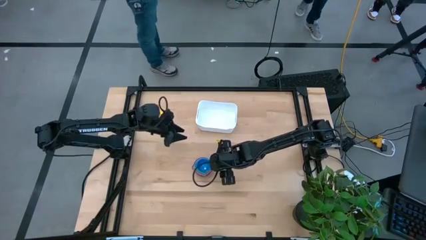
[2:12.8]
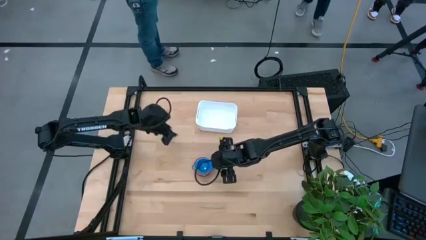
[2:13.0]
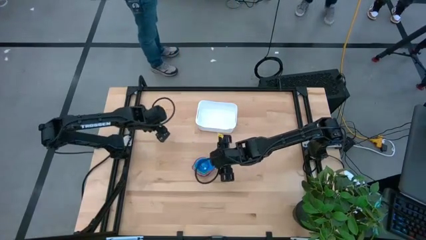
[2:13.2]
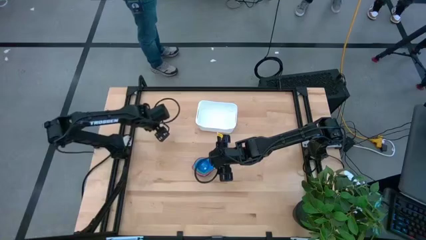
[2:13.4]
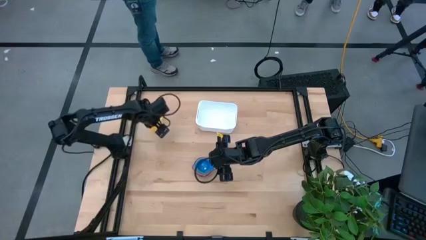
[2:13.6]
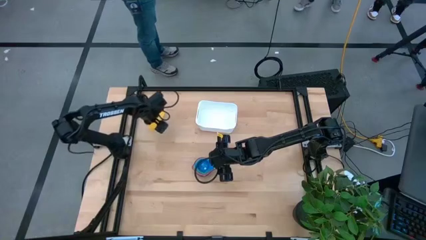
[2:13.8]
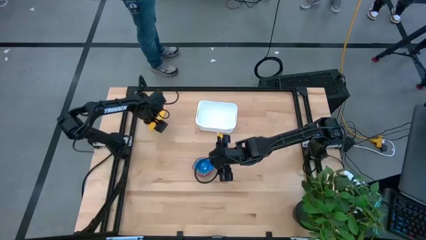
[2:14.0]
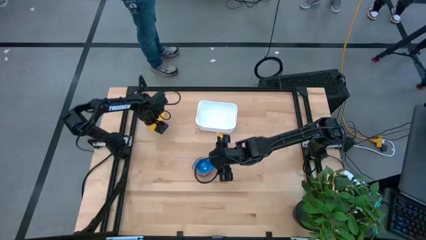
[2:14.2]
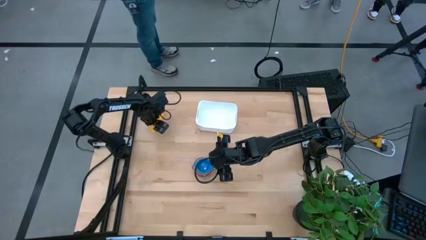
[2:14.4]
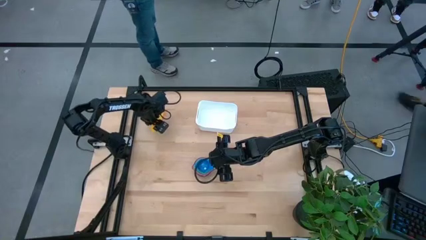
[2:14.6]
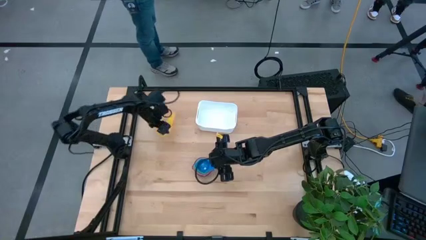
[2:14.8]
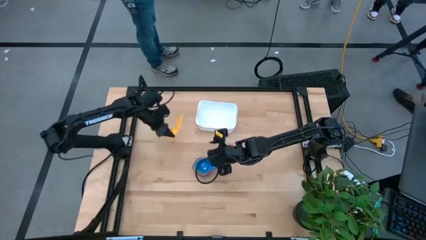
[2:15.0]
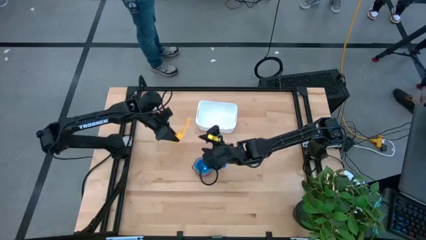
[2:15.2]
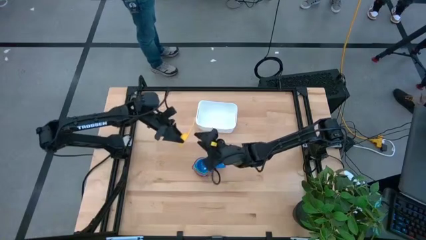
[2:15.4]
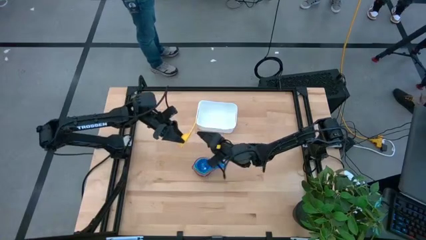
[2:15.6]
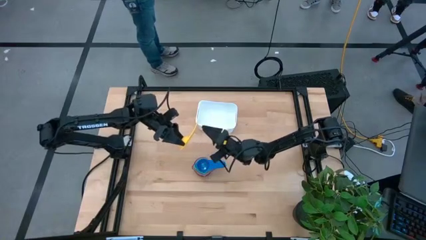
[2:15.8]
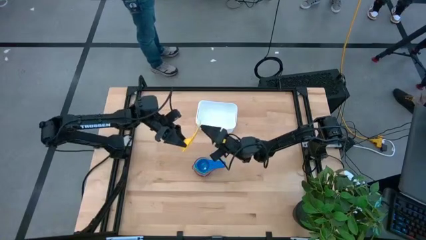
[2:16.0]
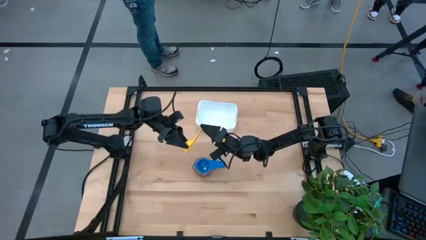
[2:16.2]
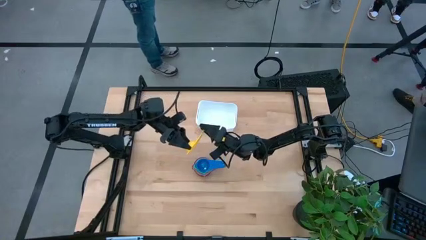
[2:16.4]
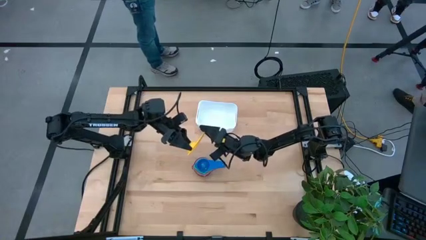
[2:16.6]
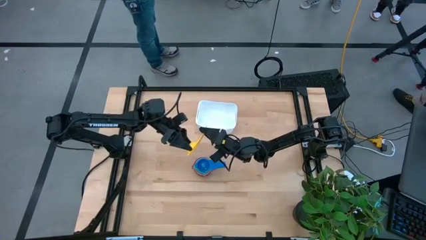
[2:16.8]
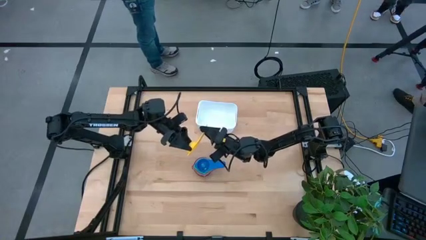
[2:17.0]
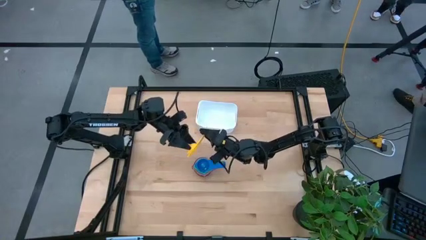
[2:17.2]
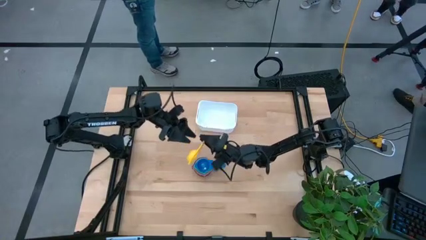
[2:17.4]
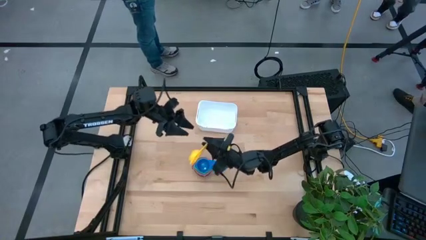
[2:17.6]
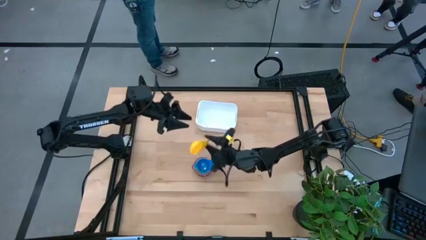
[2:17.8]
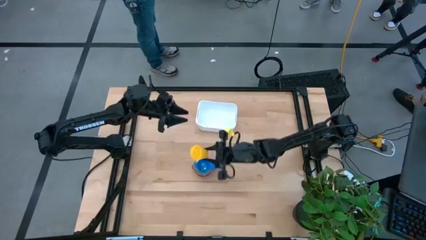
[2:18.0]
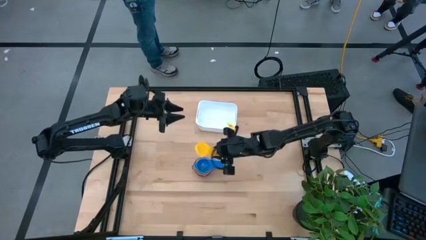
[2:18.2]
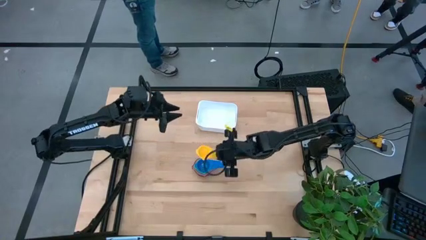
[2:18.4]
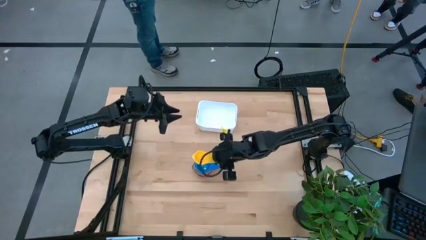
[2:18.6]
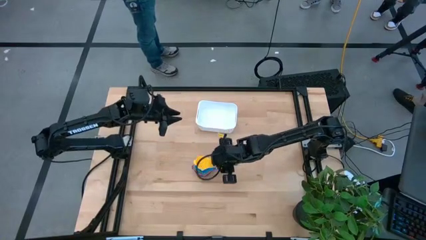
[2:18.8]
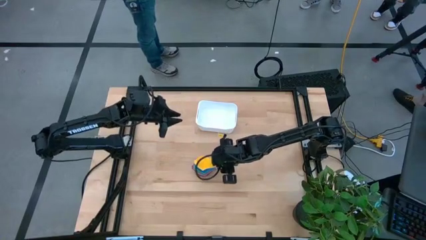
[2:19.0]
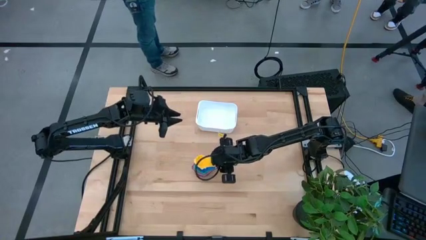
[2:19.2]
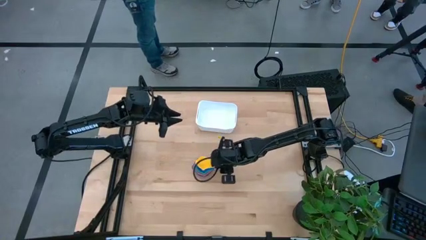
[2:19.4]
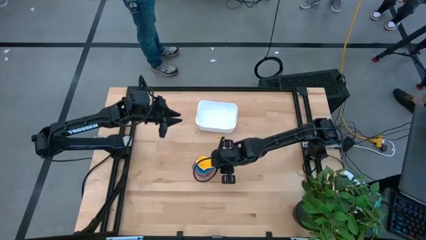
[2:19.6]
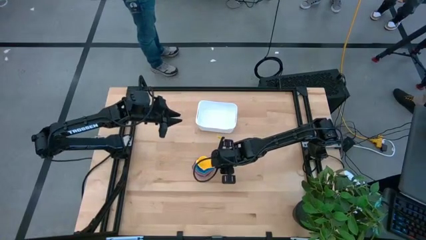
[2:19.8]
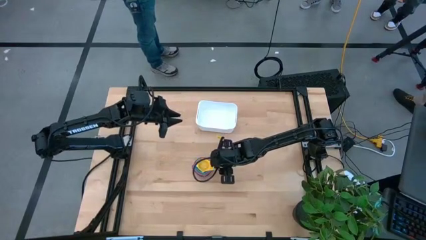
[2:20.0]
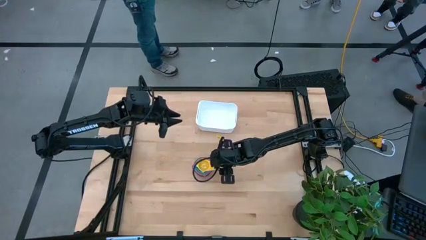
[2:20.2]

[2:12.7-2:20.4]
Task: Nest measuring cups in basket
Stack the yellow measuring cup on top of the dark blue measuring cup

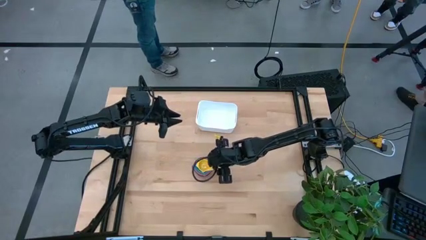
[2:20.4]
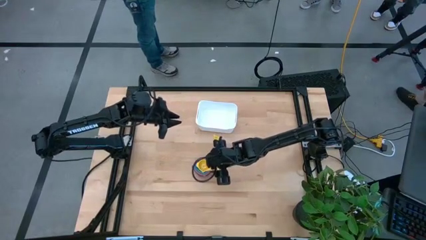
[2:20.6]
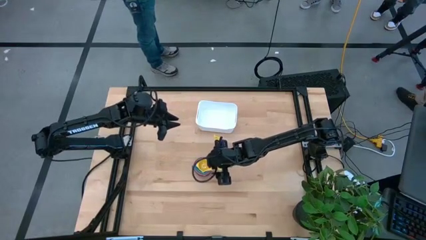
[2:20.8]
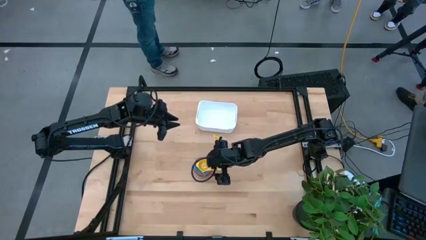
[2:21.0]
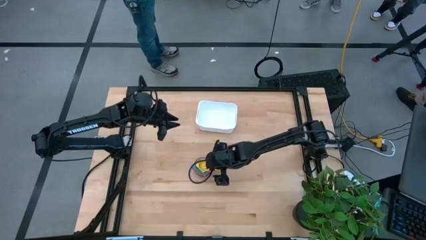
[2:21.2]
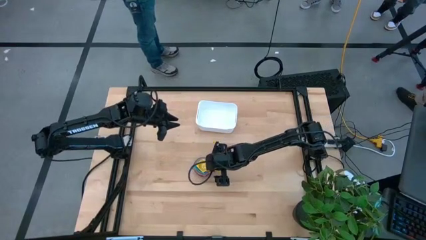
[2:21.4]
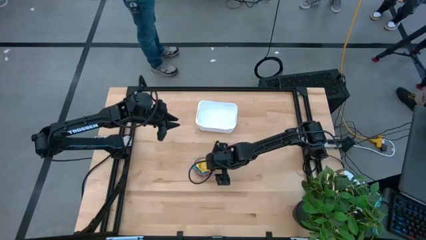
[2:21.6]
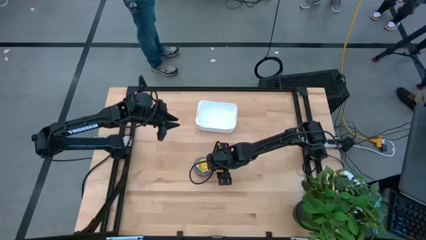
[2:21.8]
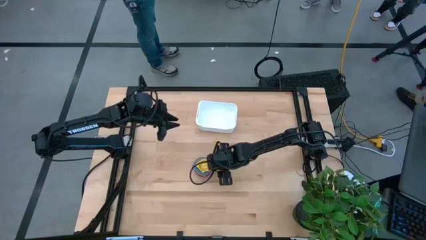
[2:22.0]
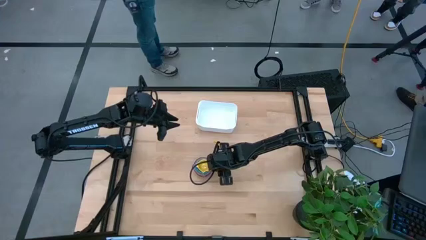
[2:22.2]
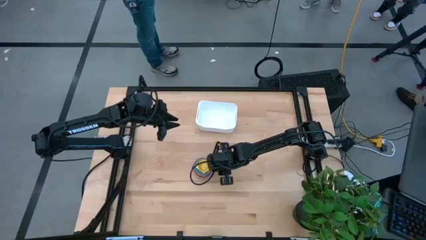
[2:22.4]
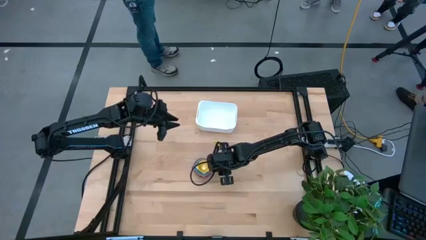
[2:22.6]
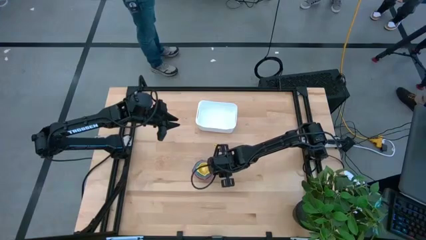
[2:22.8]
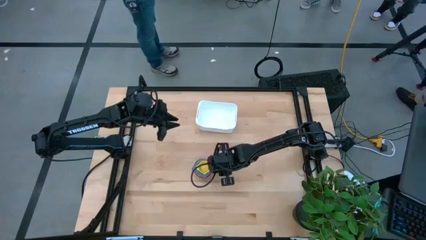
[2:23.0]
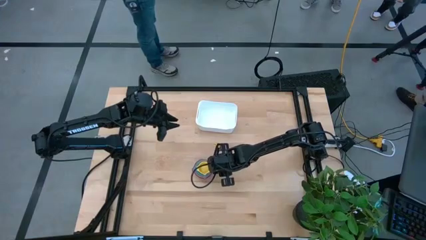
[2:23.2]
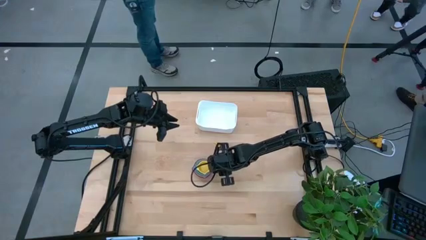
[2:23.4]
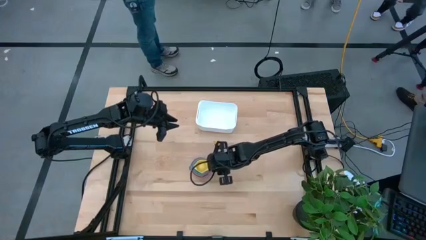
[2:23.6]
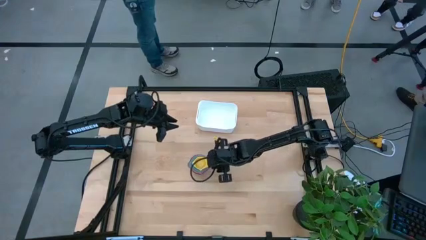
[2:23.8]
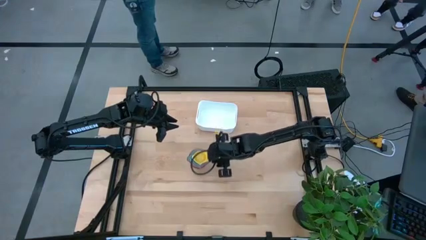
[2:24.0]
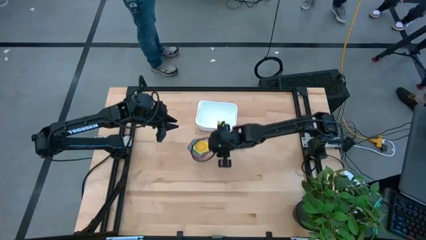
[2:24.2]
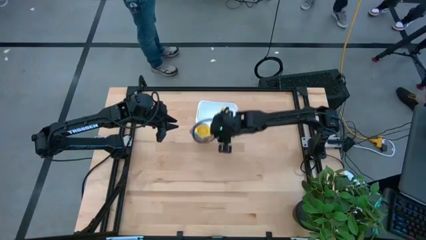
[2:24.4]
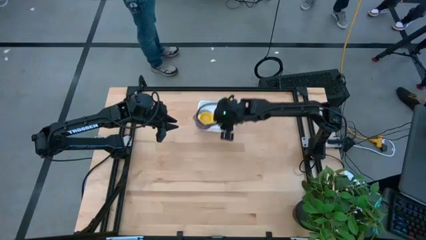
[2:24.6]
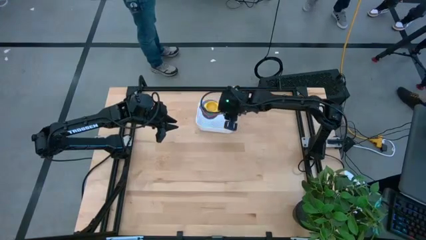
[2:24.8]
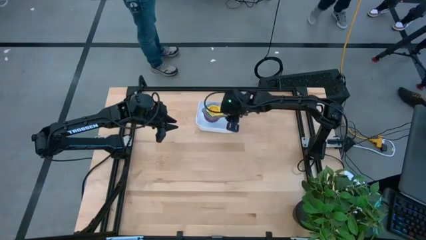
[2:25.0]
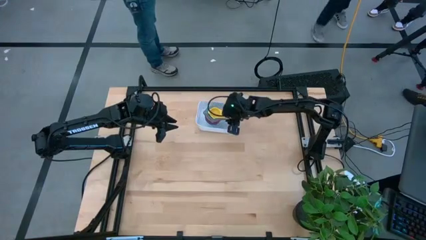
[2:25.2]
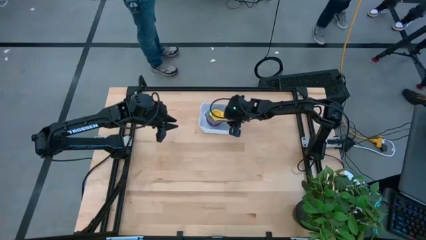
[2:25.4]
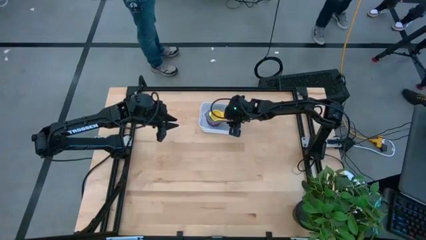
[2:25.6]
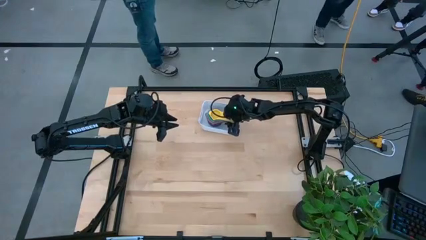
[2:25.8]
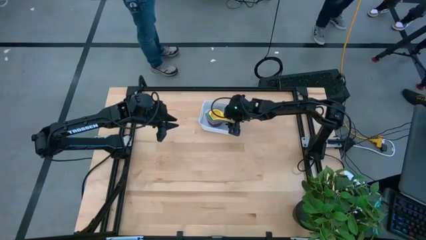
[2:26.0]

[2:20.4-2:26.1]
Put the stack of measuring cups into the white bin
